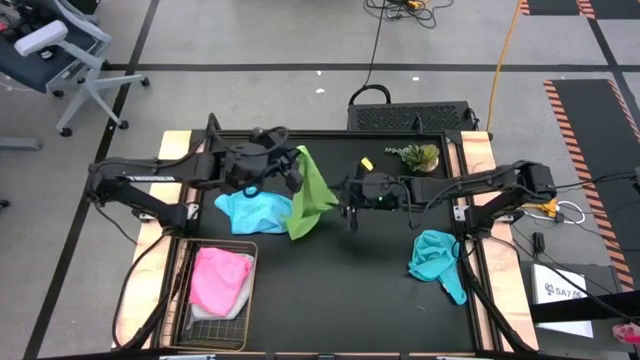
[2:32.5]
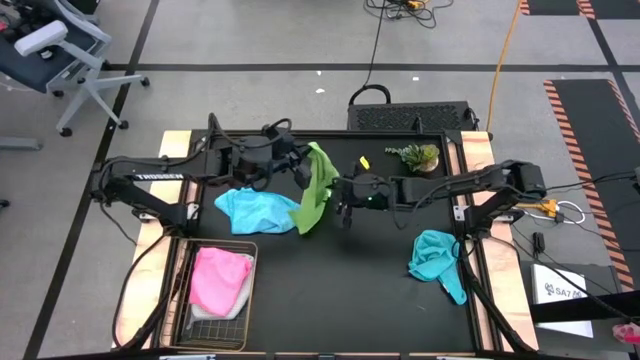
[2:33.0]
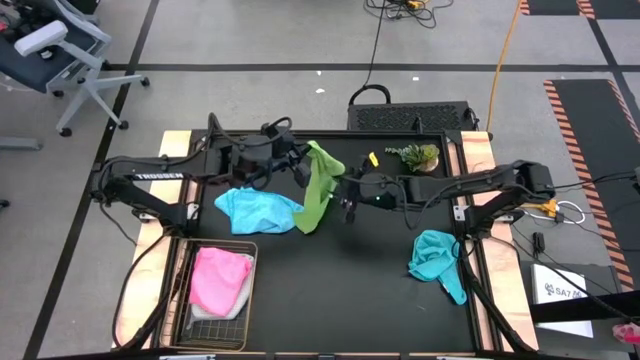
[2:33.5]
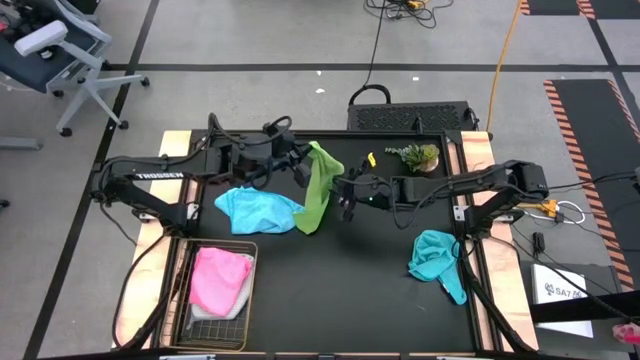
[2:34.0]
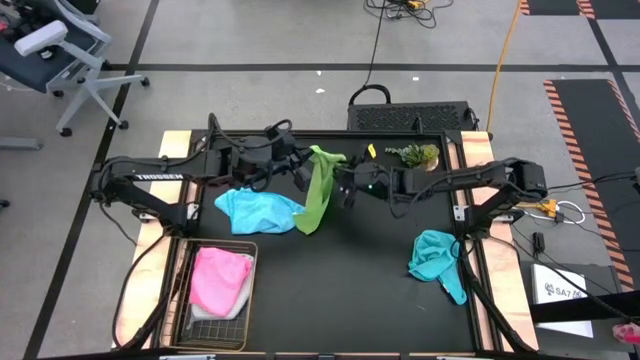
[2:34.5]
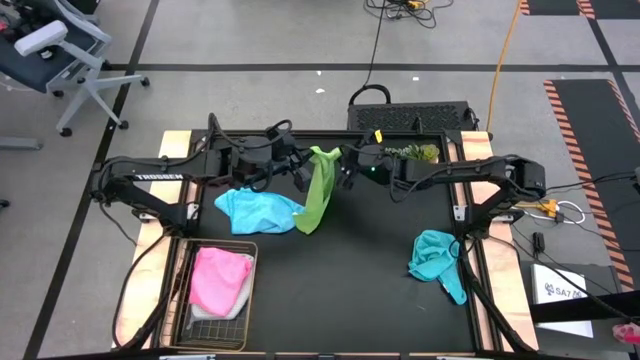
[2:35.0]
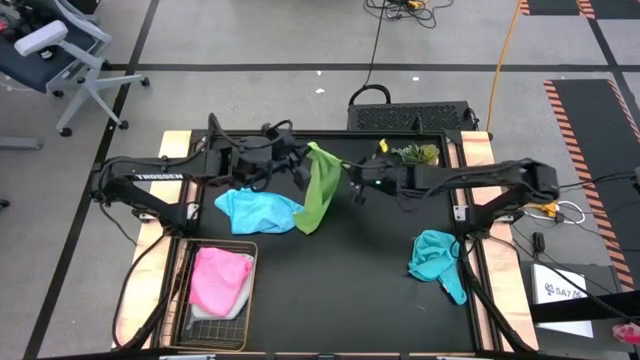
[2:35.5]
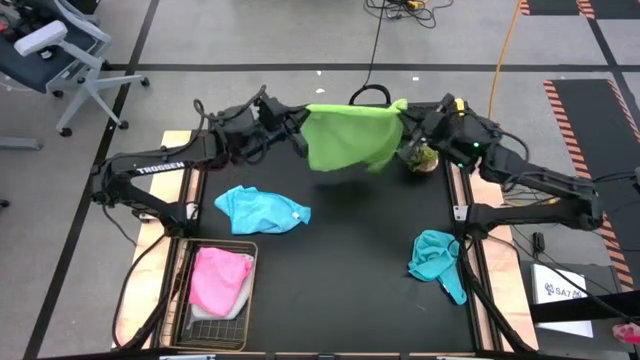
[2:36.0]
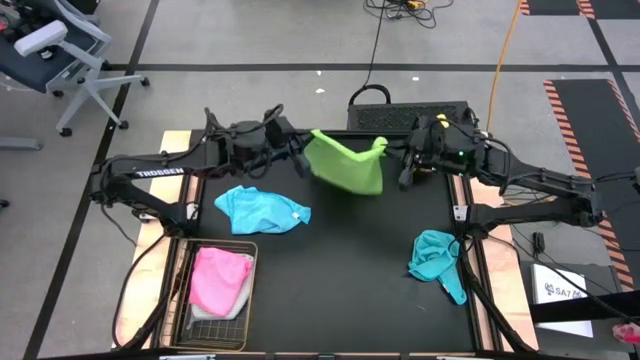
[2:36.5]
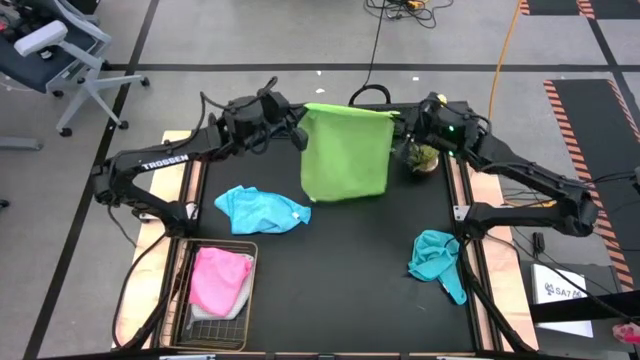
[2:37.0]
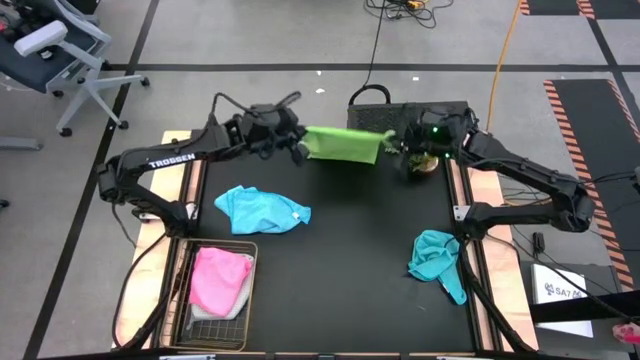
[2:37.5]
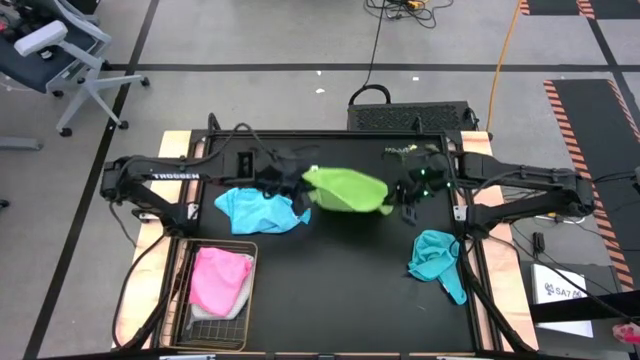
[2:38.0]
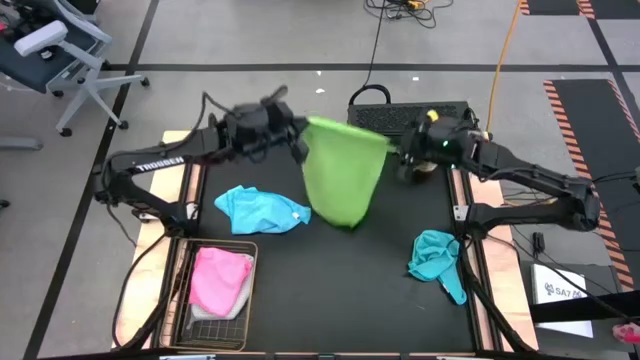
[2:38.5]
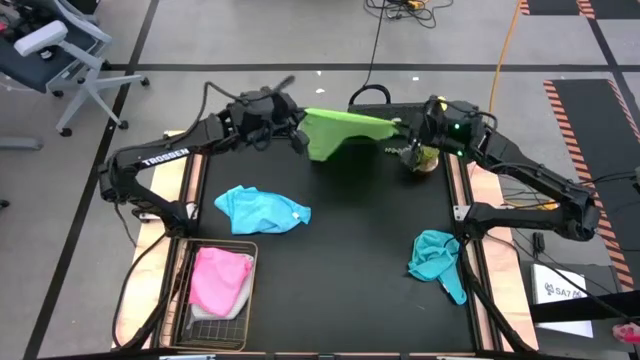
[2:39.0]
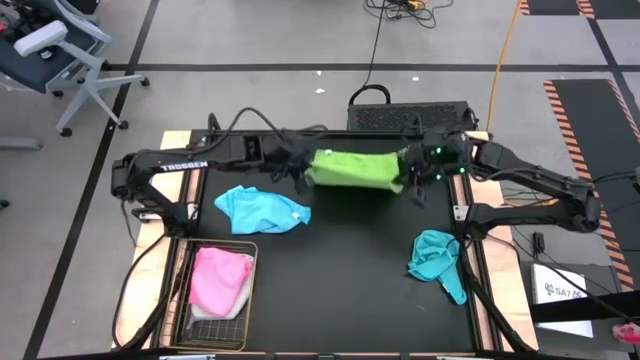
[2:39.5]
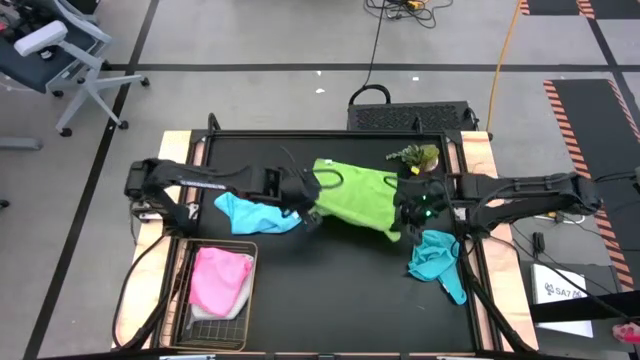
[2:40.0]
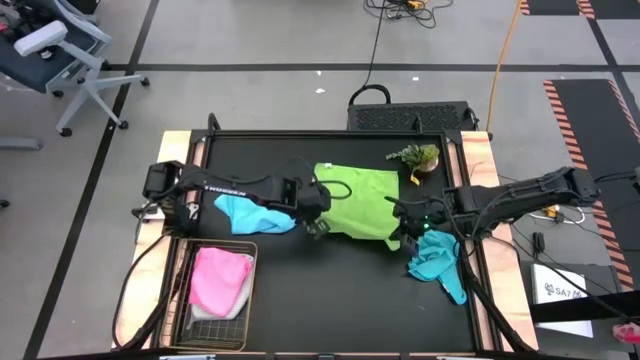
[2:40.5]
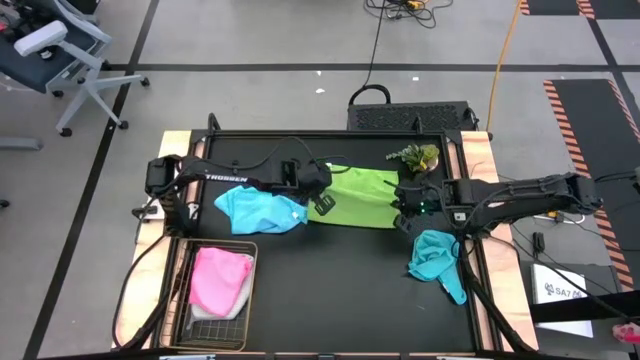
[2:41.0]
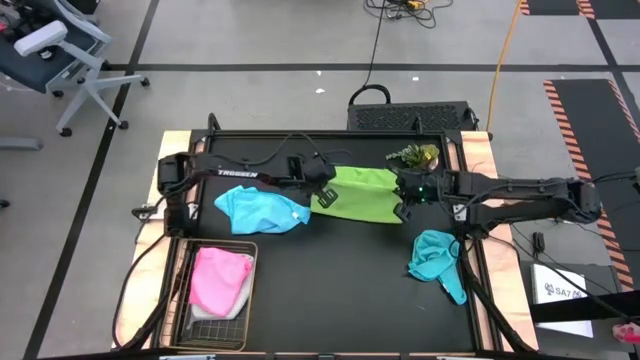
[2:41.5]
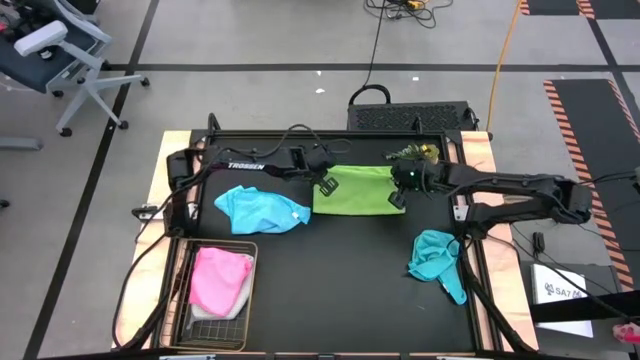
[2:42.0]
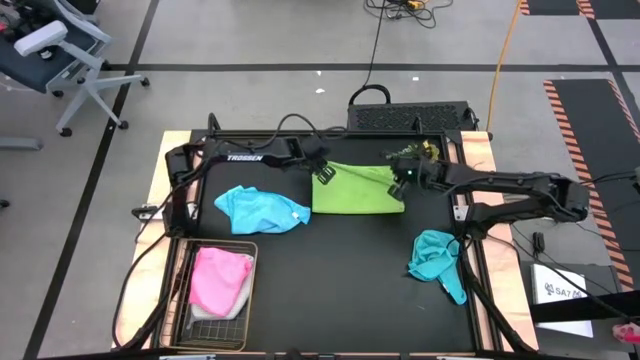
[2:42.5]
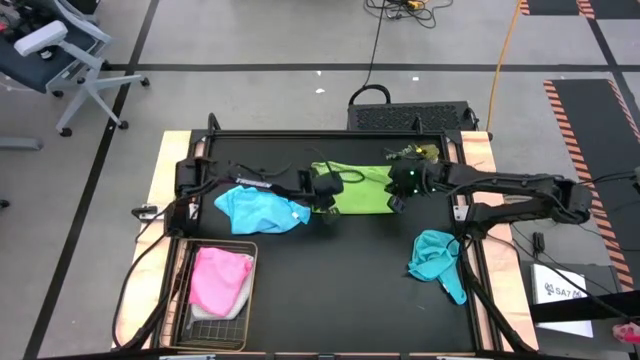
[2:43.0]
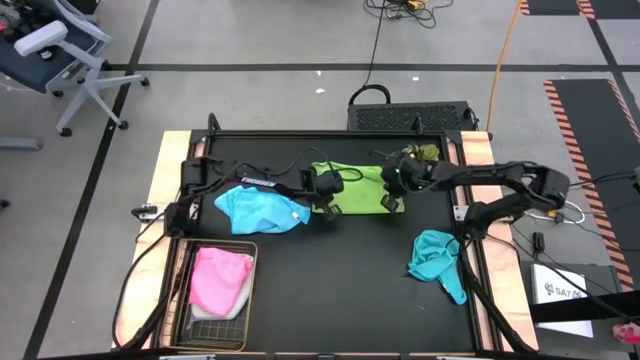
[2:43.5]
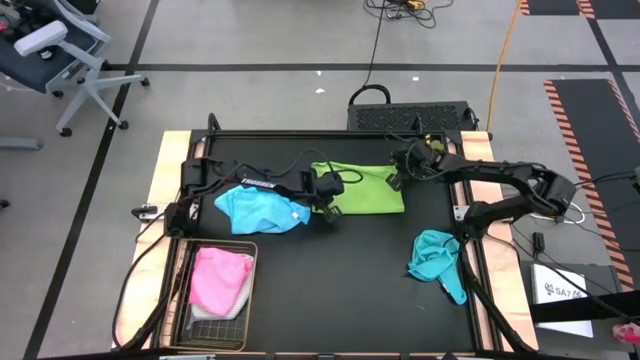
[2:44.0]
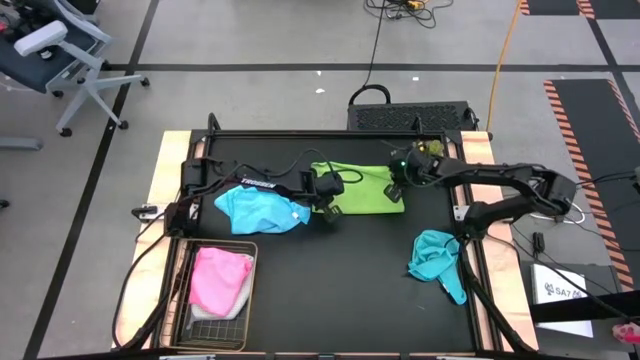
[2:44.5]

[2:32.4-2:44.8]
Task: Fold microfiber towels
Fold the green microfiber cloth

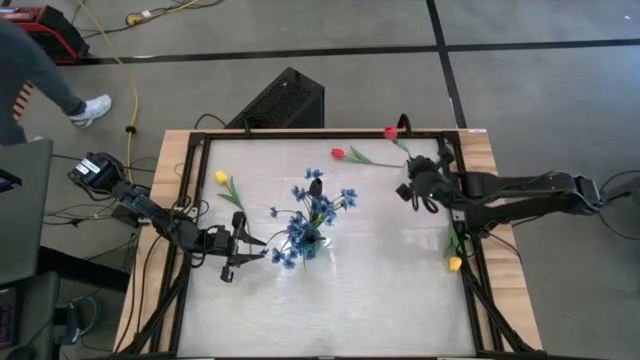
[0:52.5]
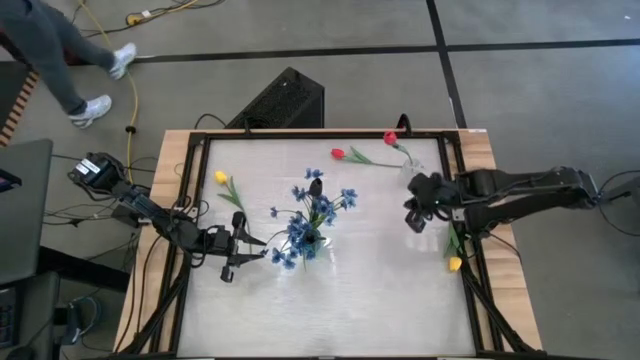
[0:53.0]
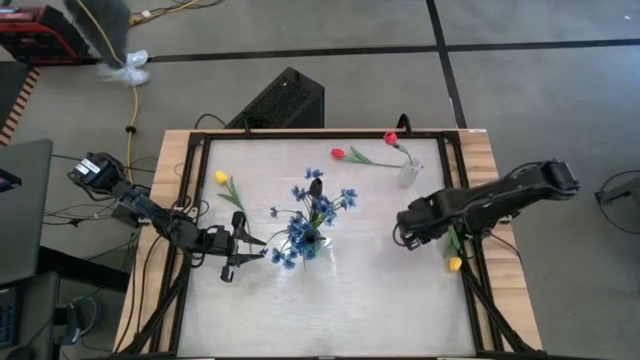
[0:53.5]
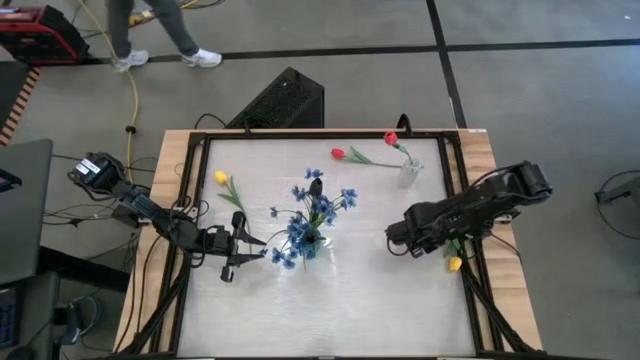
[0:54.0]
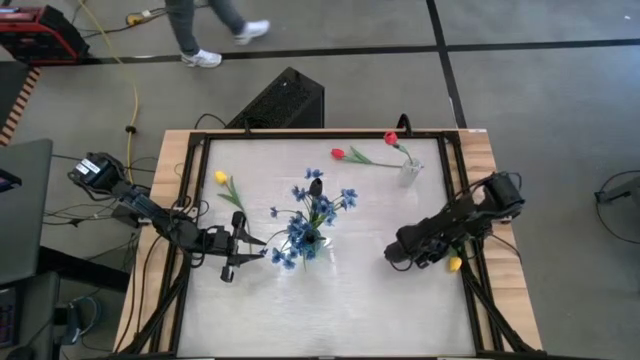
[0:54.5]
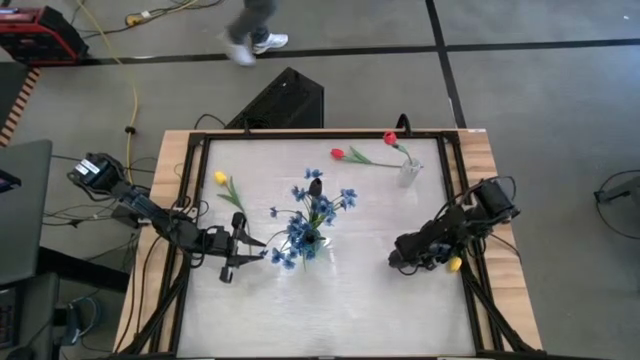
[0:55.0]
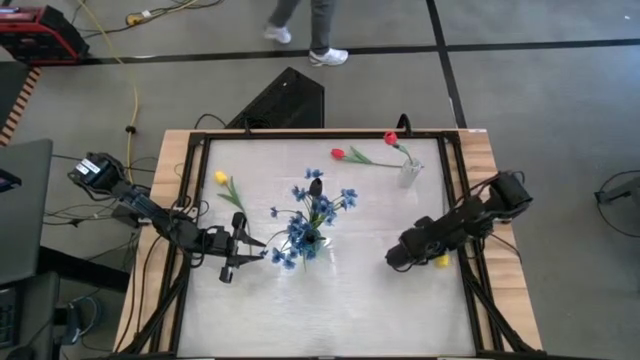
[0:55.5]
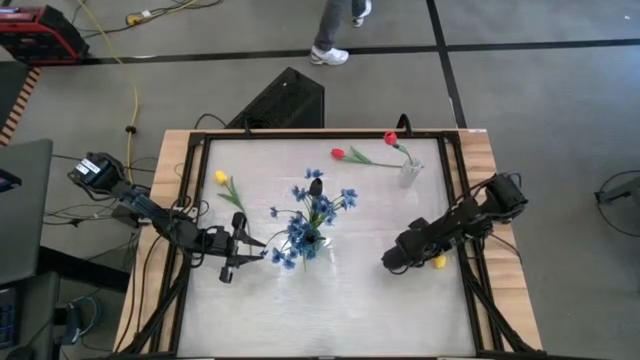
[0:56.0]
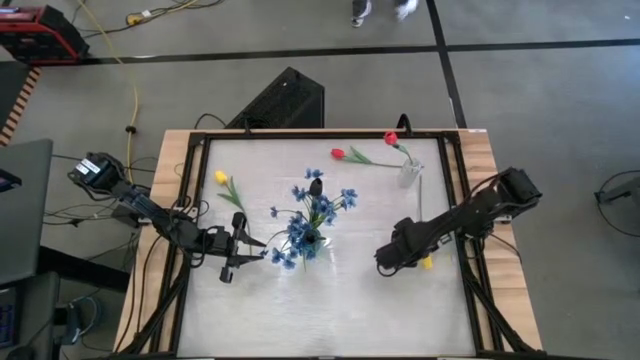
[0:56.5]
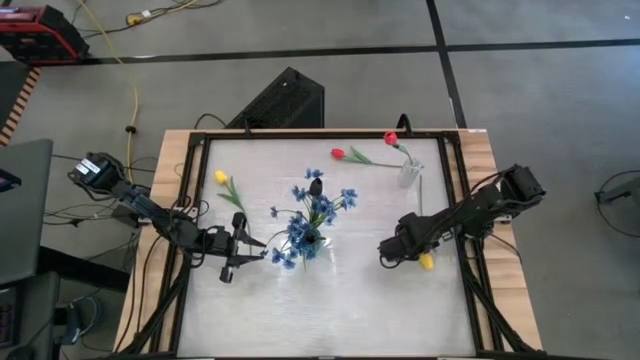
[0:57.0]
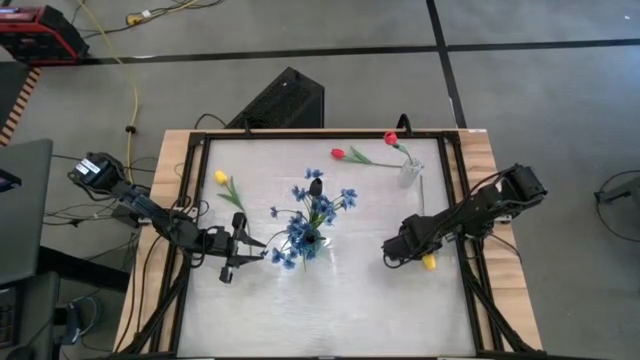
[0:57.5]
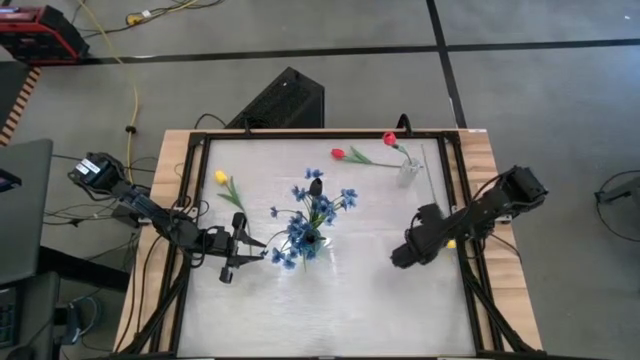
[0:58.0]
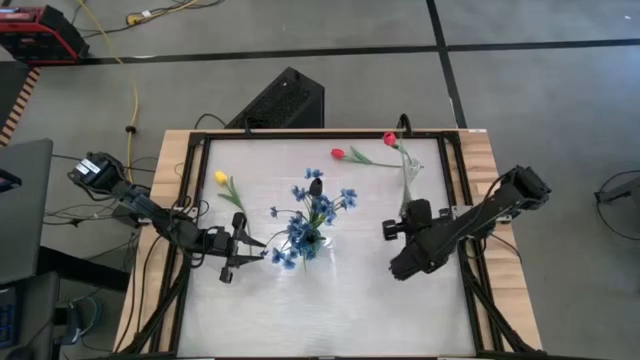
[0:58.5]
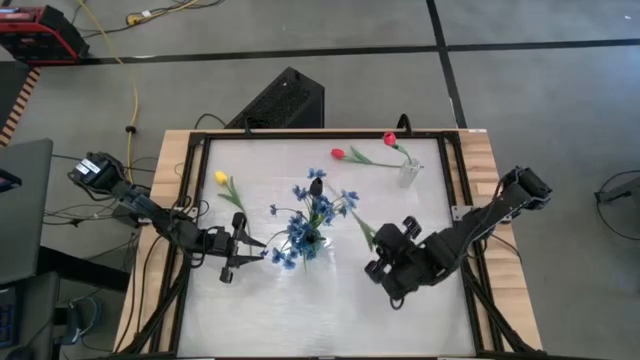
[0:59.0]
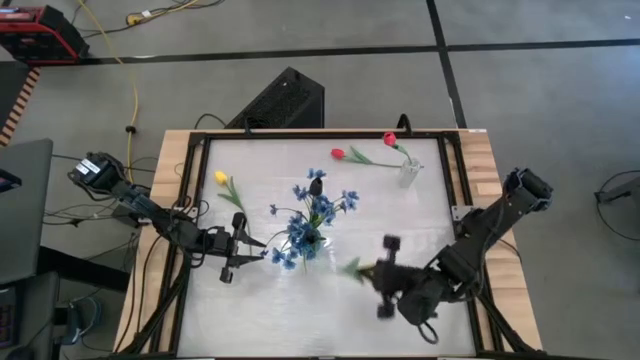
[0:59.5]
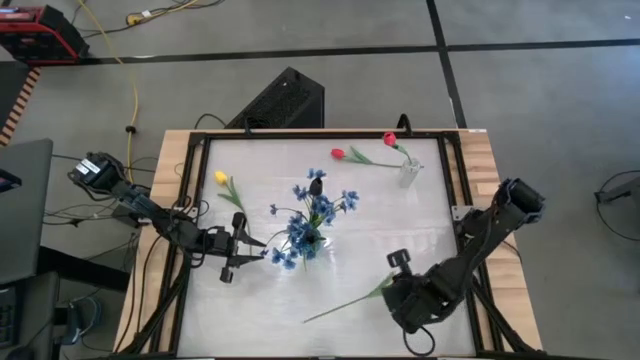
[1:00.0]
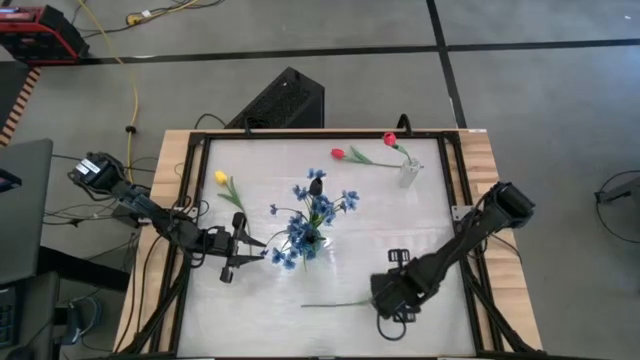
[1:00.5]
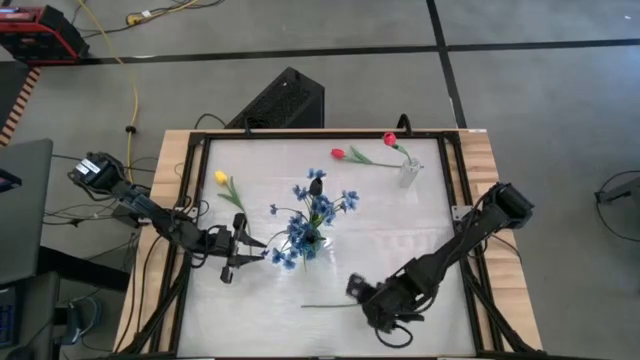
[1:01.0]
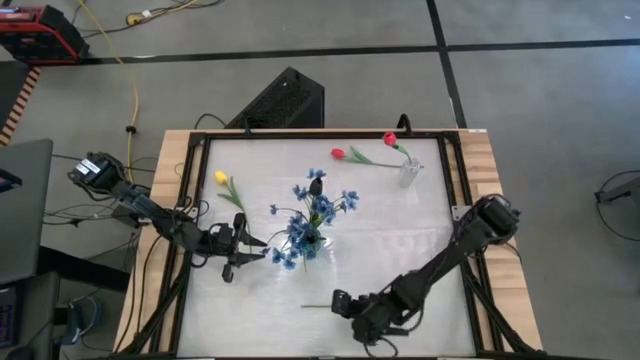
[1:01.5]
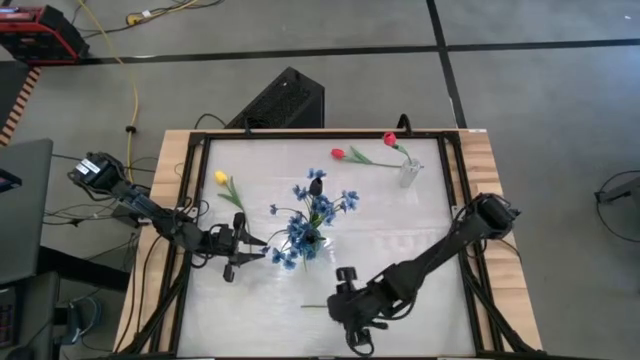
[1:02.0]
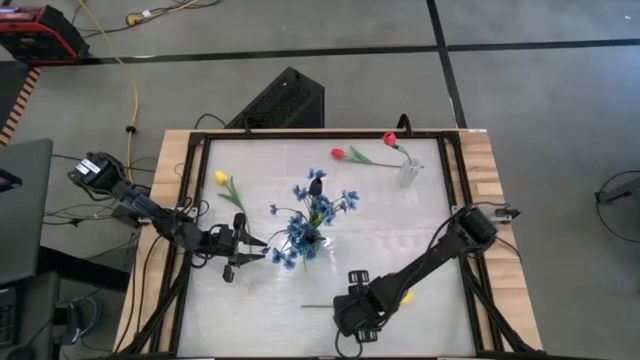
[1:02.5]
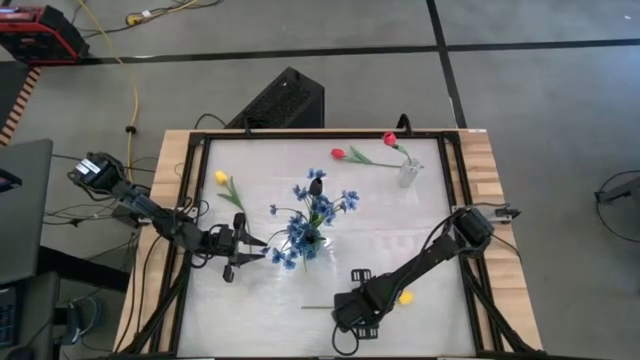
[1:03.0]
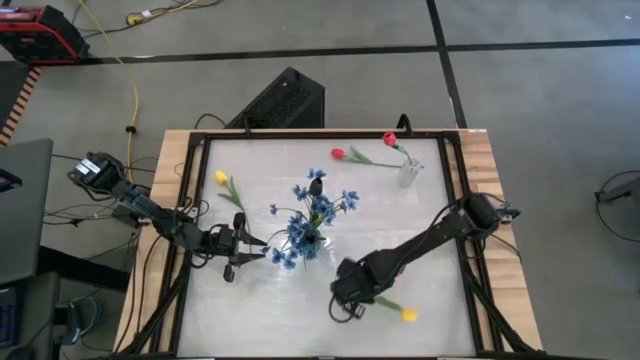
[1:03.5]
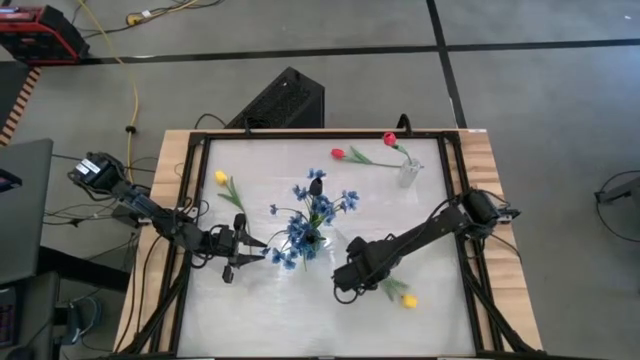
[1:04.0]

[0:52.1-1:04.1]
Task: Sort flowers into vase by color
Put the right yellow tulip into the transparent vase
